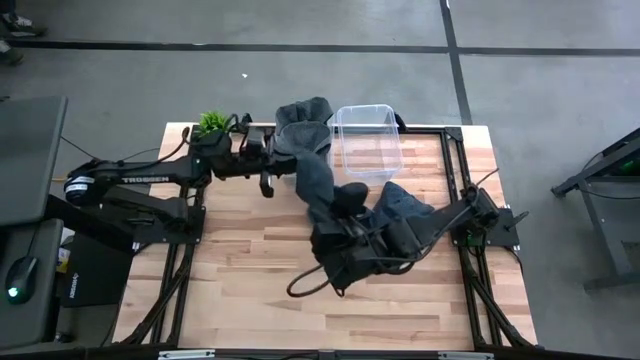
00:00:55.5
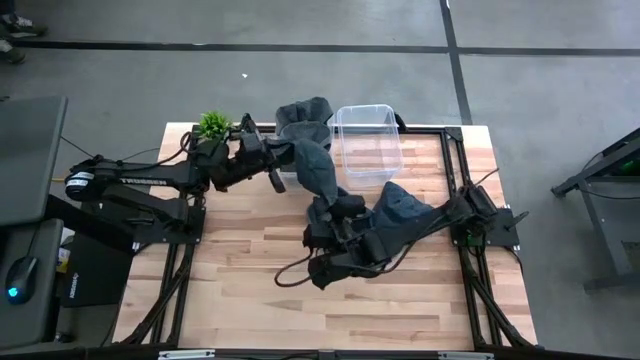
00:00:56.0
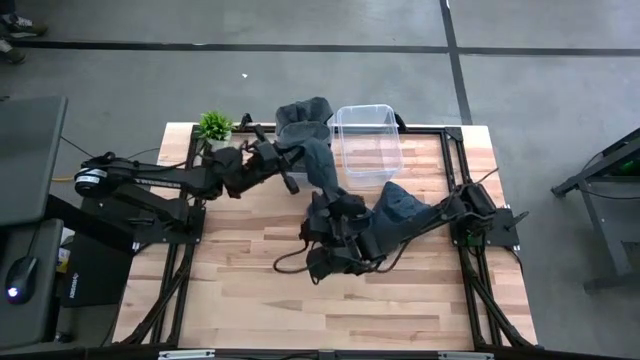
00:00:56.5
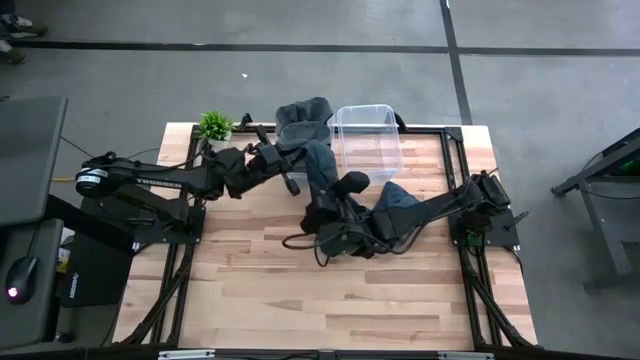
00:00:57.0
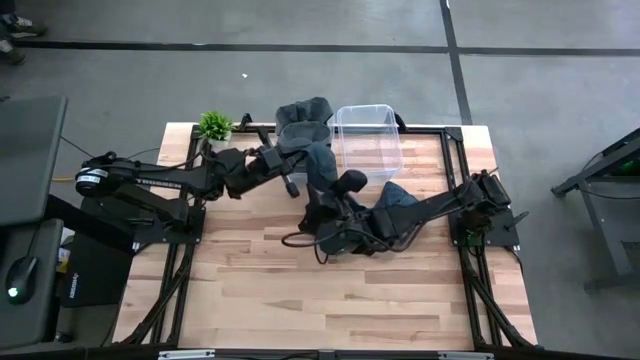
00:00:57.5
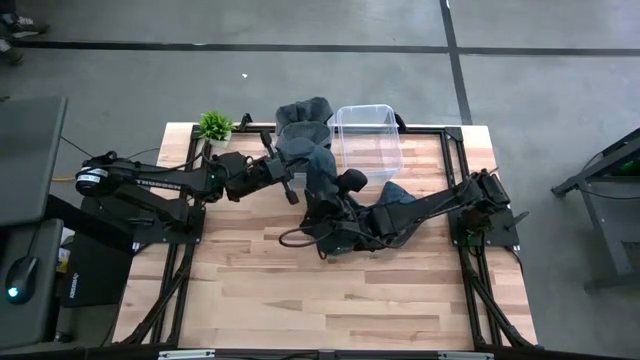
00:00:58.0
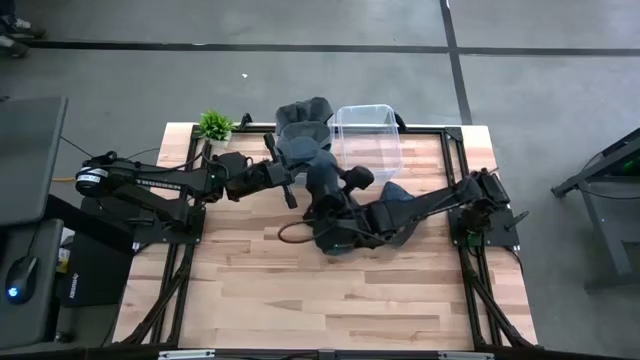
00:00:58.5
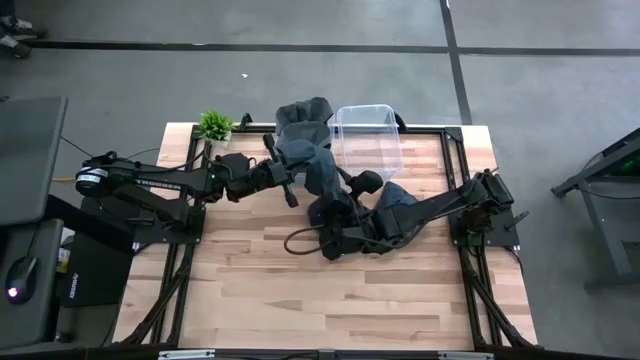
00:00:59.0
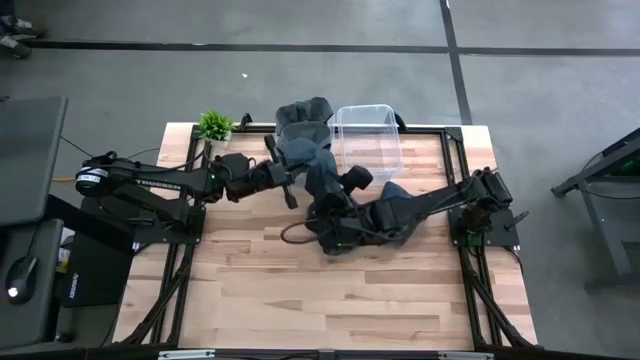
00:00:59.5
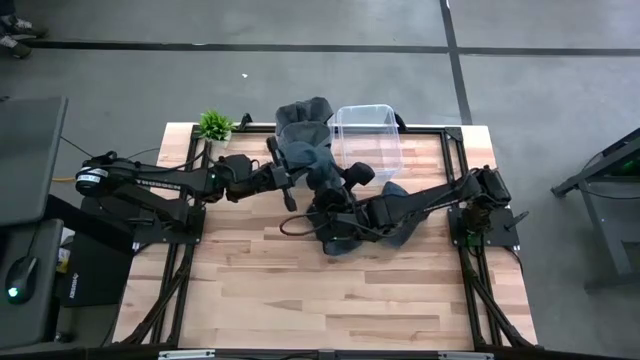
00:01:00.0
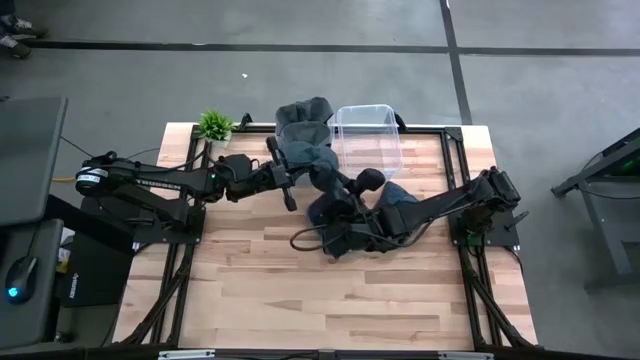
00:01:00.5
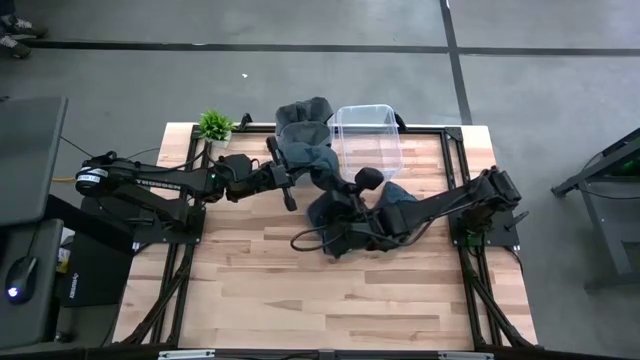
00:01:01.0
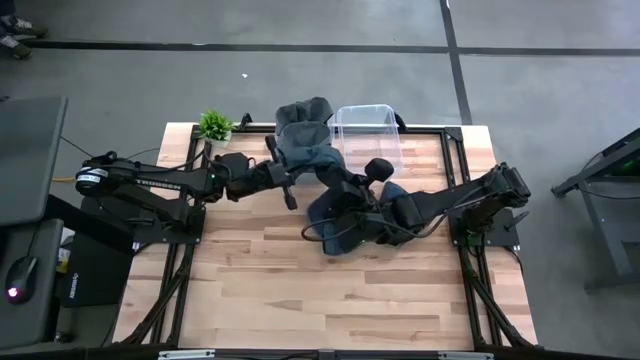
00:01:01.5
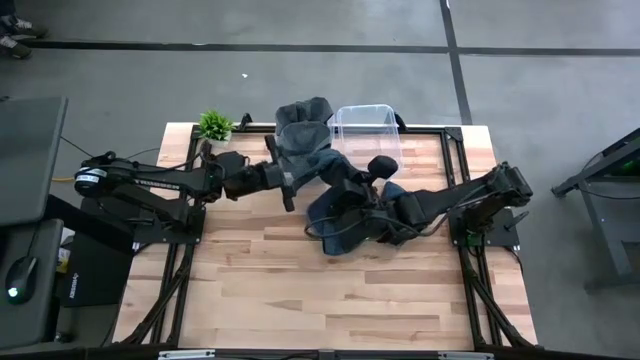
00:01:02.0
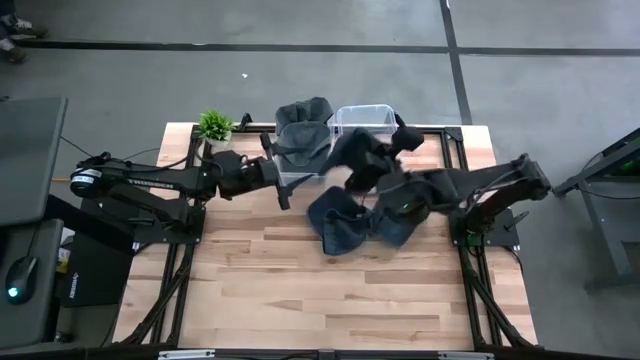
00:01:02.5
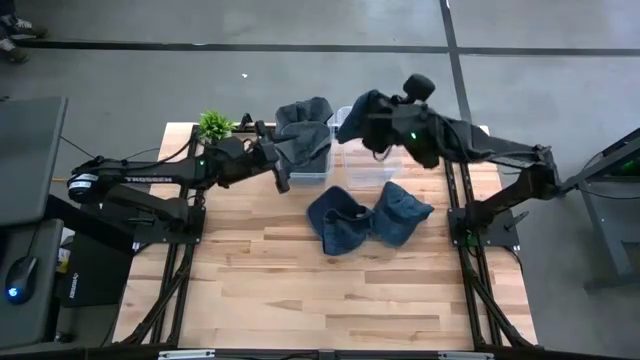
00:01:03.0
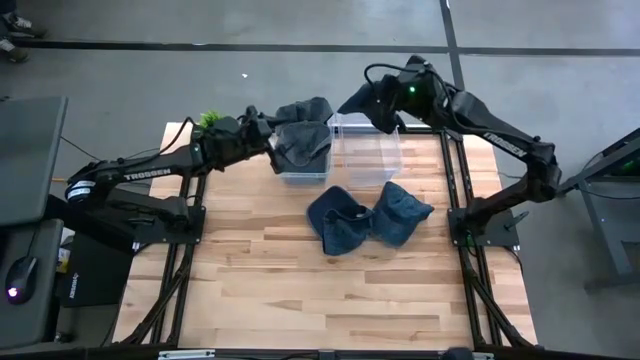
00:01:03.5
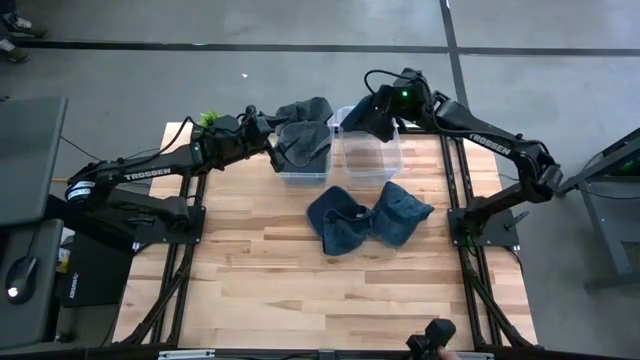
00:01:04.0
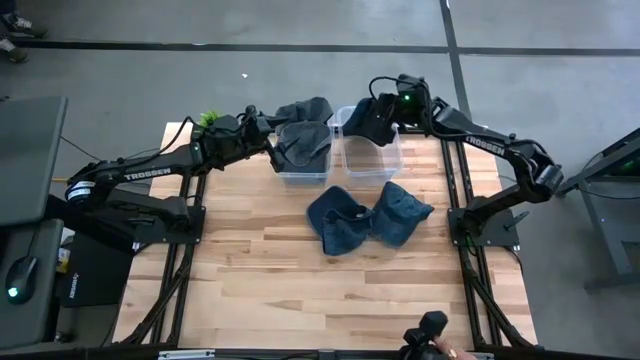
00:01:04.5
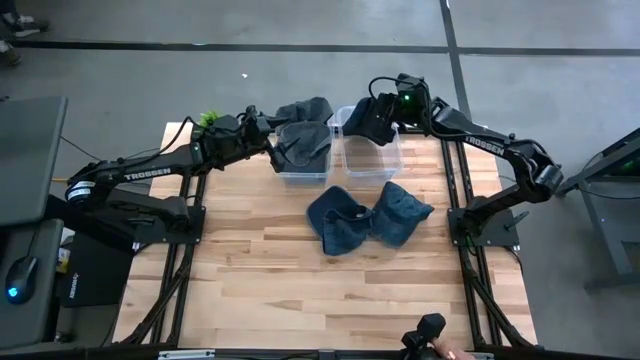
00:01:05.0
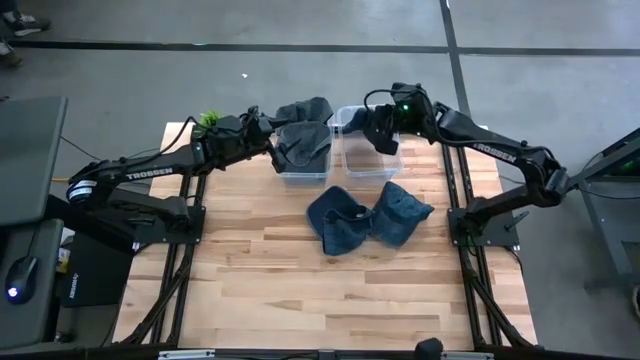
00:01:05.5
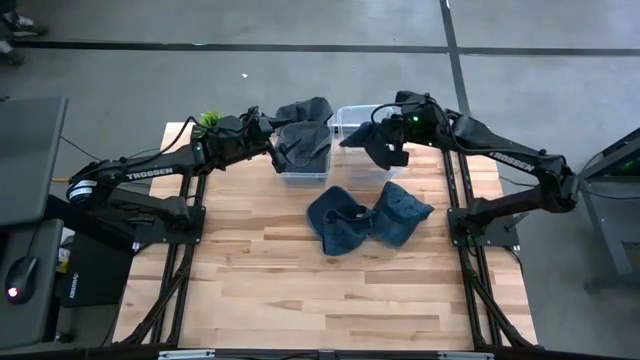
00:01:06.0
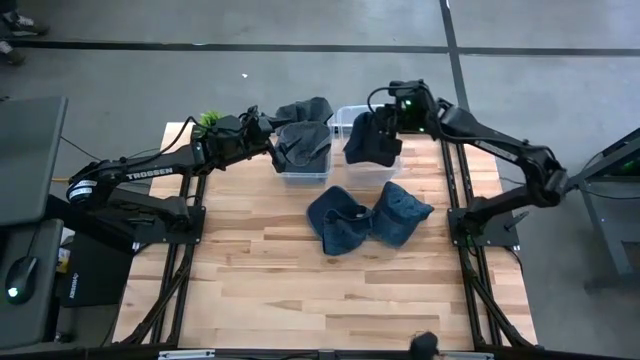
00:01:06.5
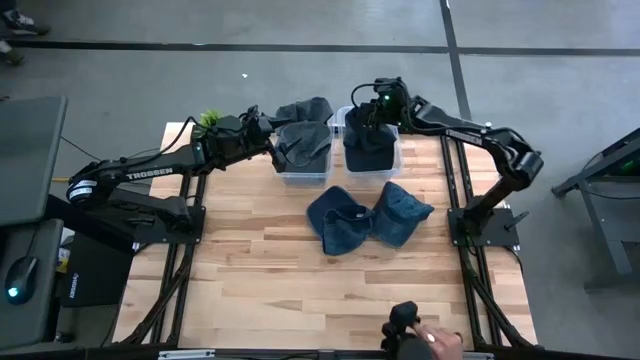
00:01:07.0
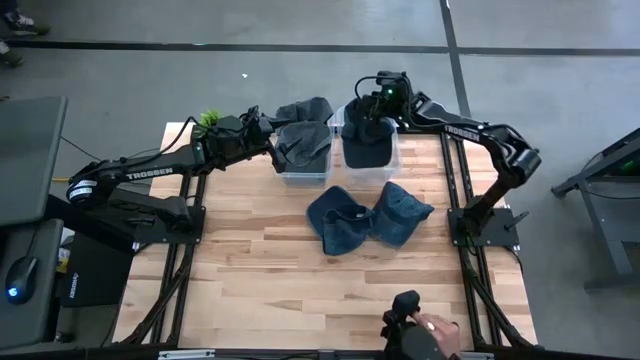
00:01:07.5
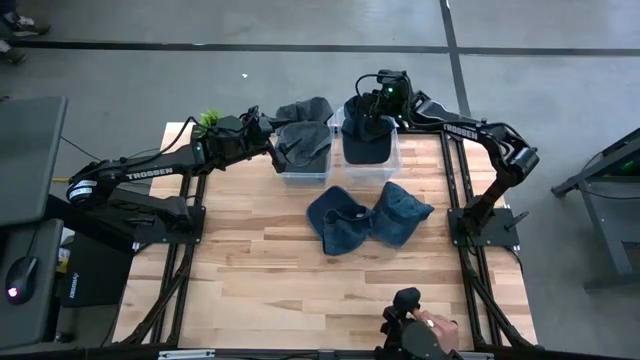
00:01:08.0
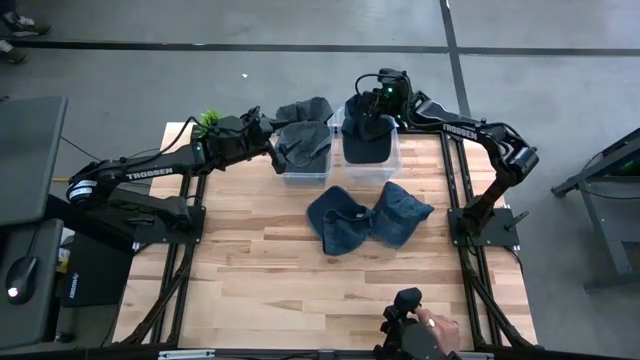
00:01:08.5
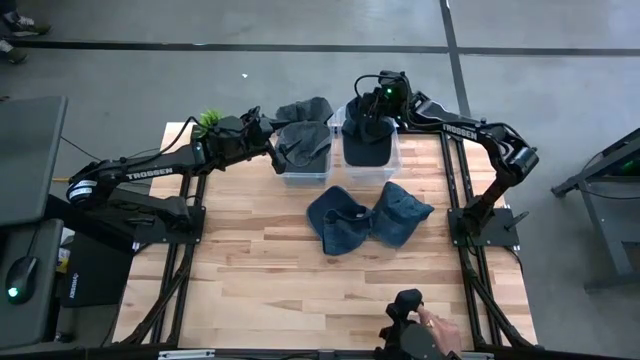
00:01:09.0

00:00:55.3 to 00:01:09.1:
Task: Pick & Place hat
Put the left blue cap into the right transparent bin
